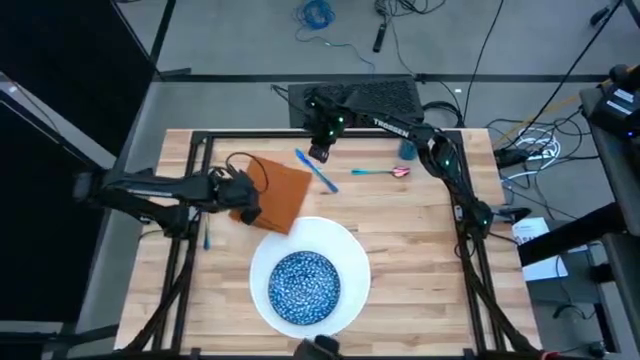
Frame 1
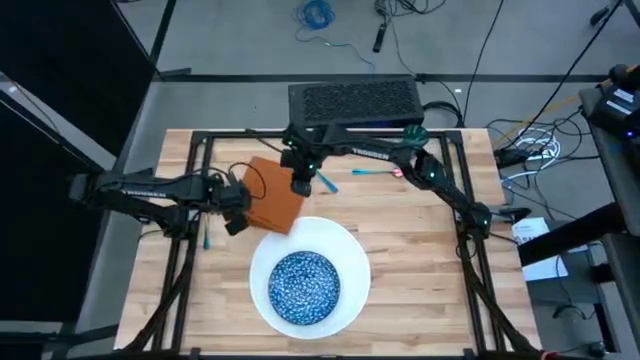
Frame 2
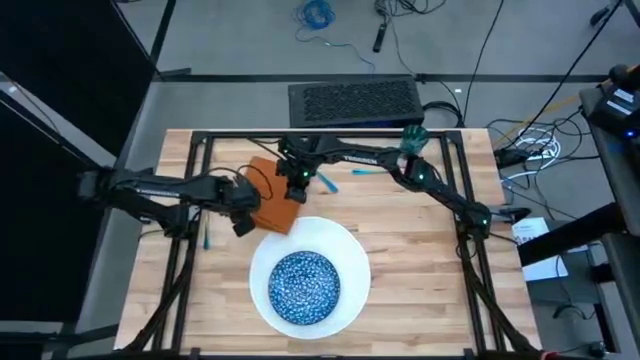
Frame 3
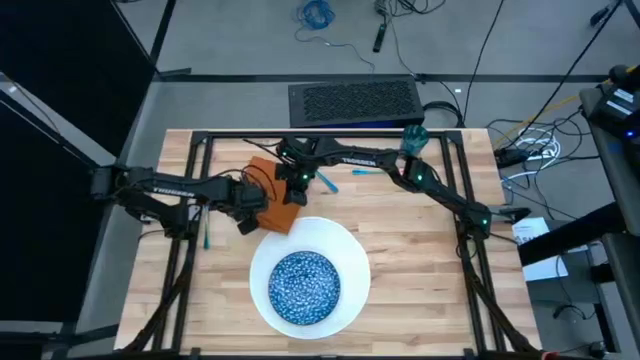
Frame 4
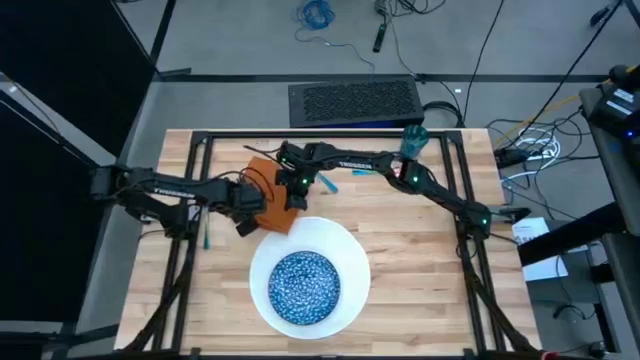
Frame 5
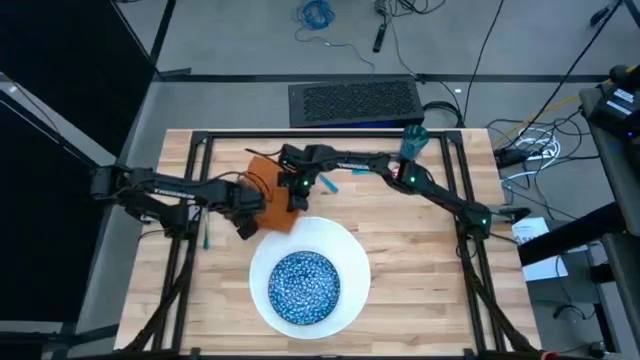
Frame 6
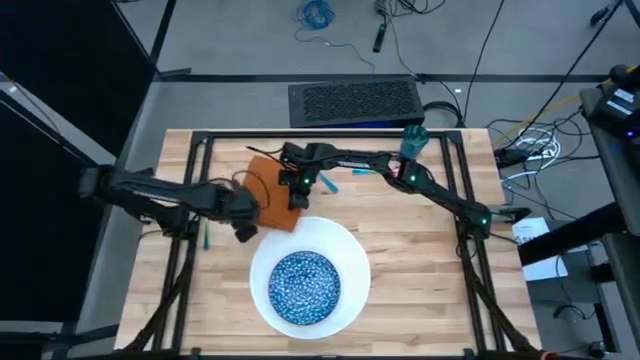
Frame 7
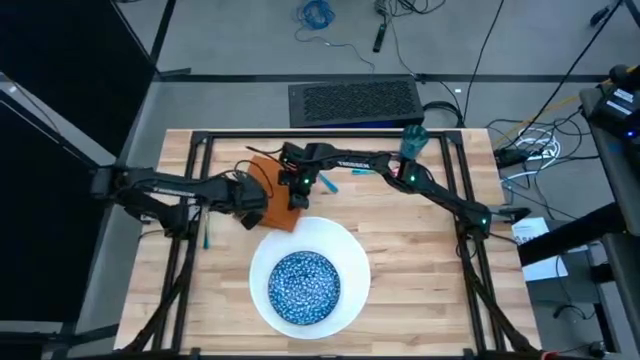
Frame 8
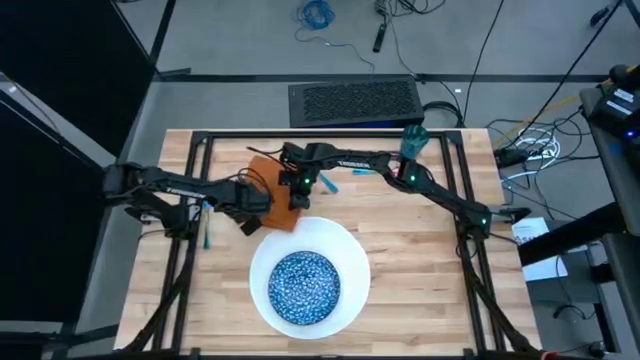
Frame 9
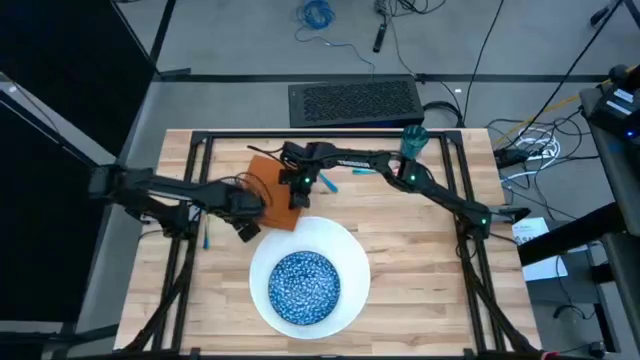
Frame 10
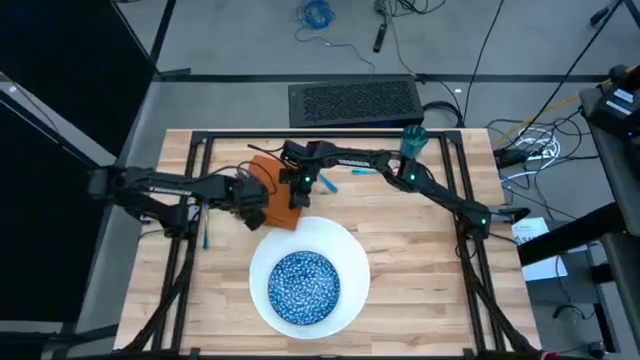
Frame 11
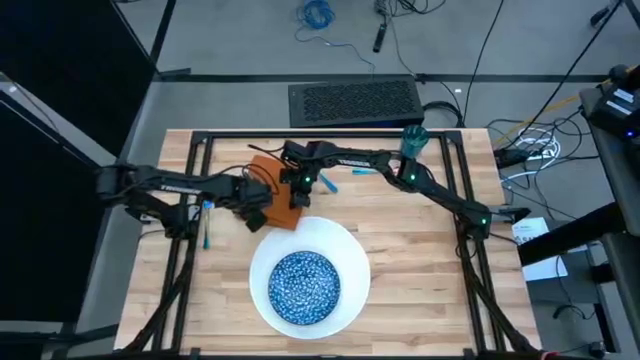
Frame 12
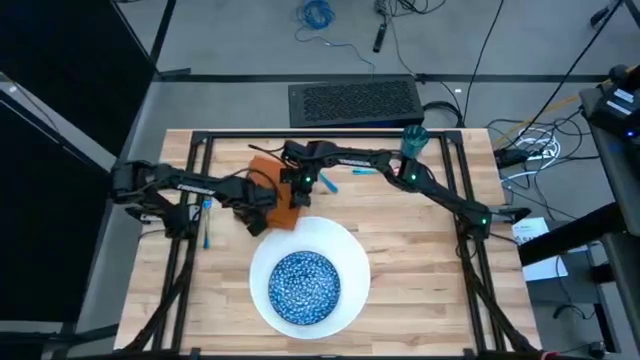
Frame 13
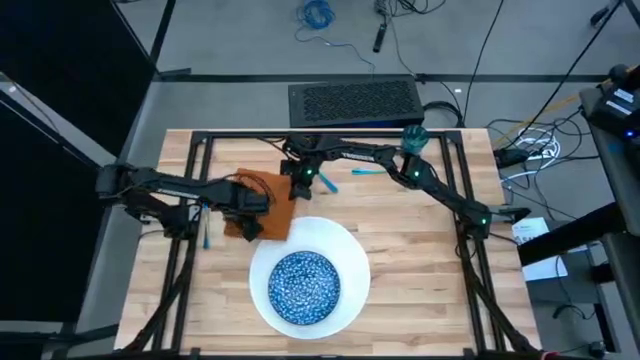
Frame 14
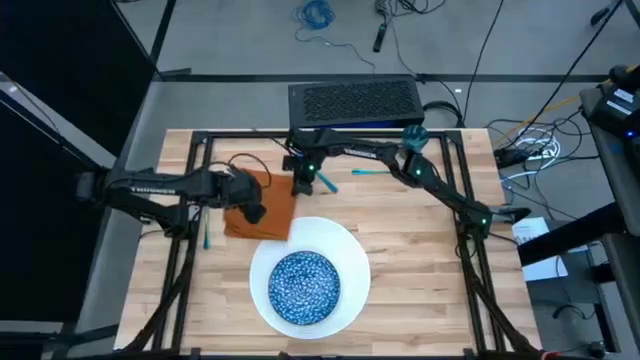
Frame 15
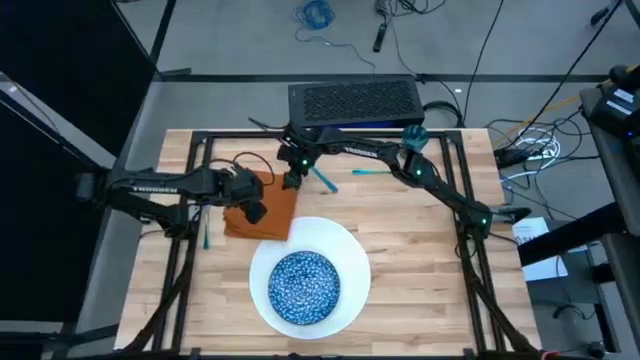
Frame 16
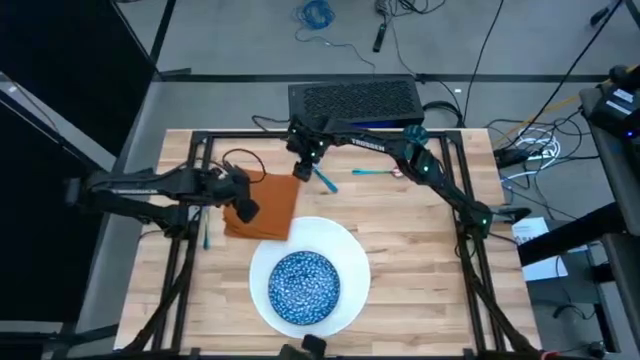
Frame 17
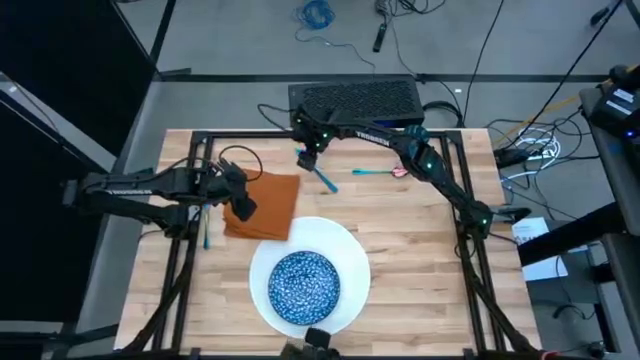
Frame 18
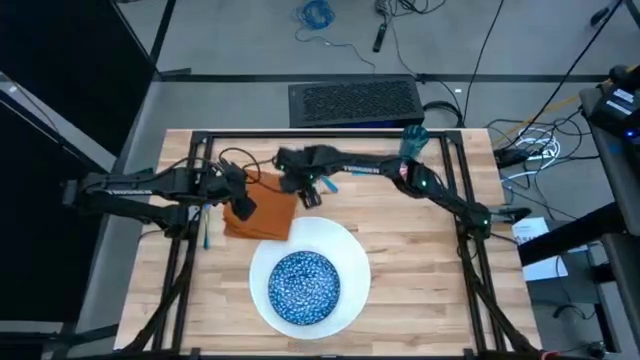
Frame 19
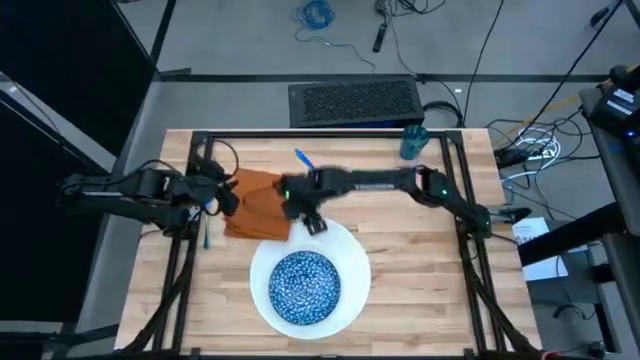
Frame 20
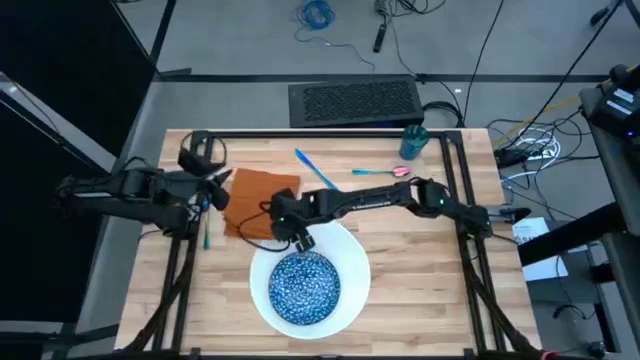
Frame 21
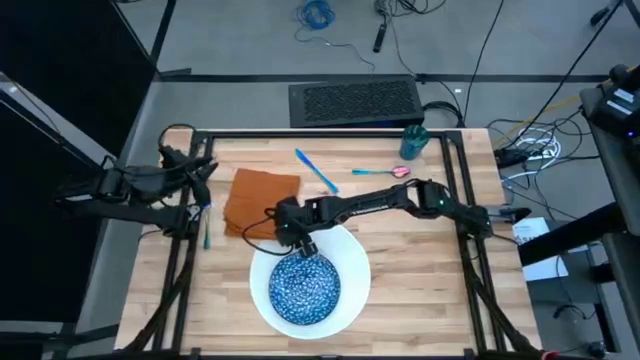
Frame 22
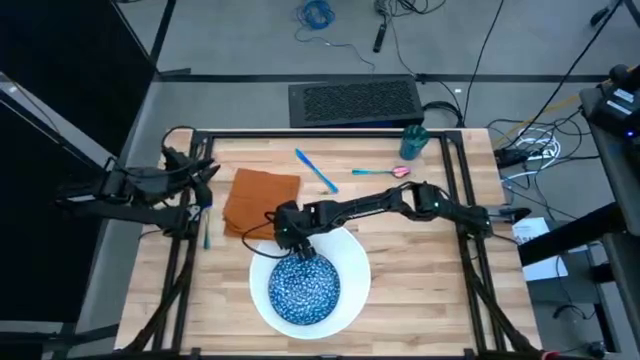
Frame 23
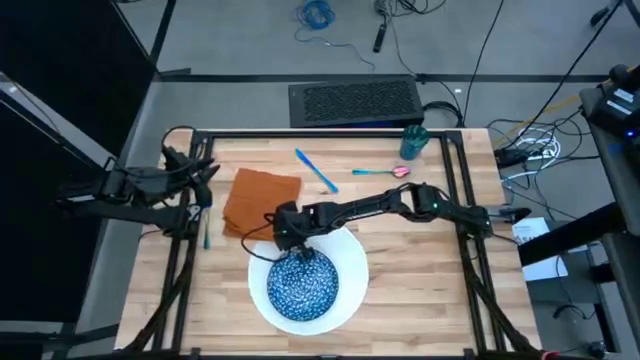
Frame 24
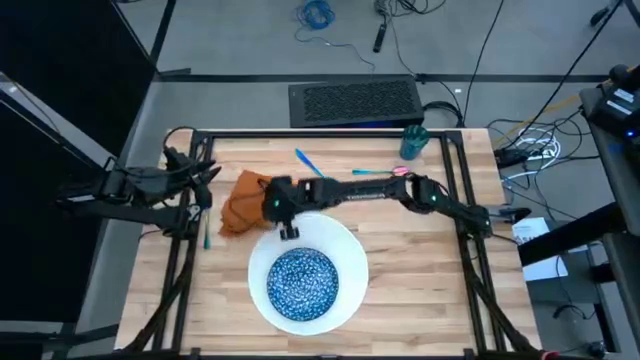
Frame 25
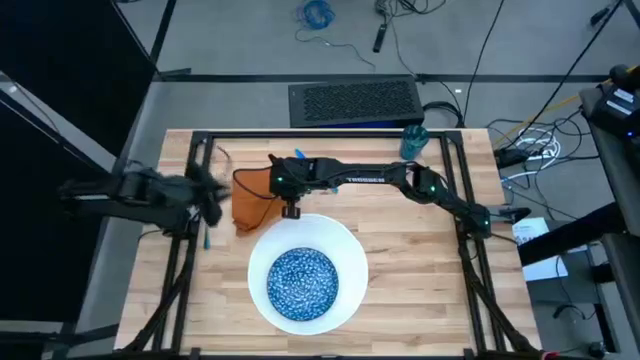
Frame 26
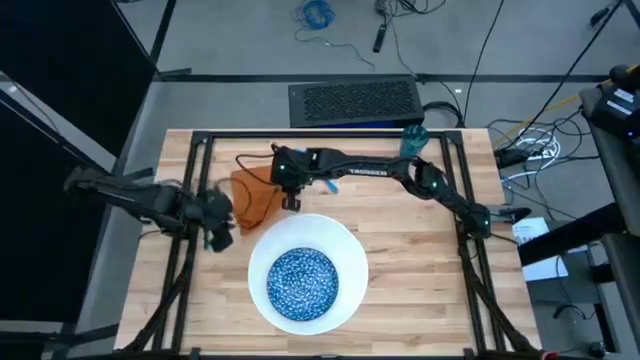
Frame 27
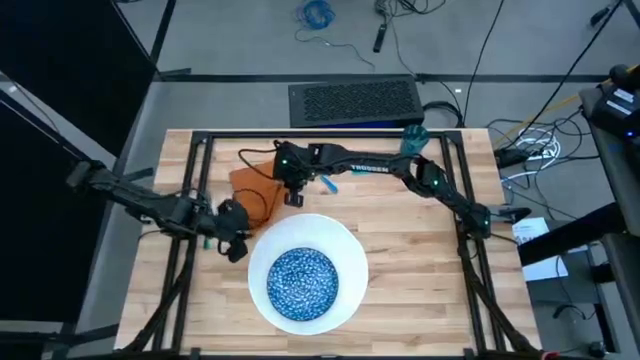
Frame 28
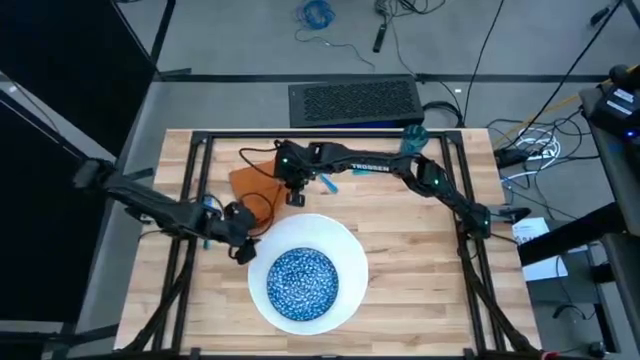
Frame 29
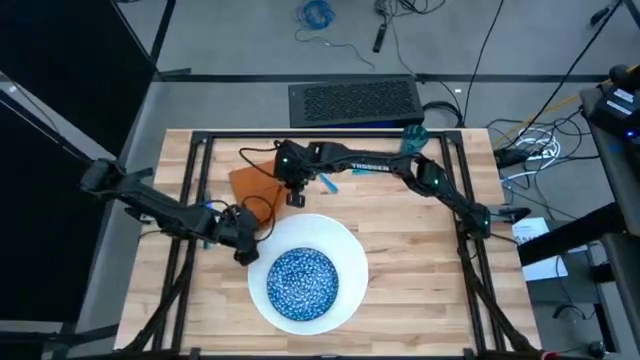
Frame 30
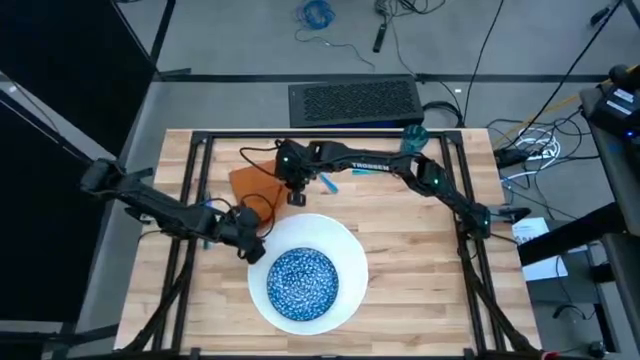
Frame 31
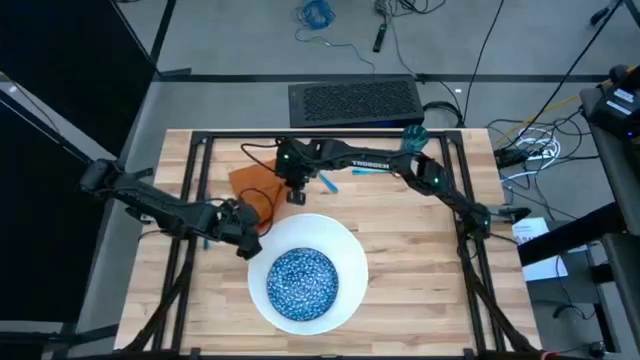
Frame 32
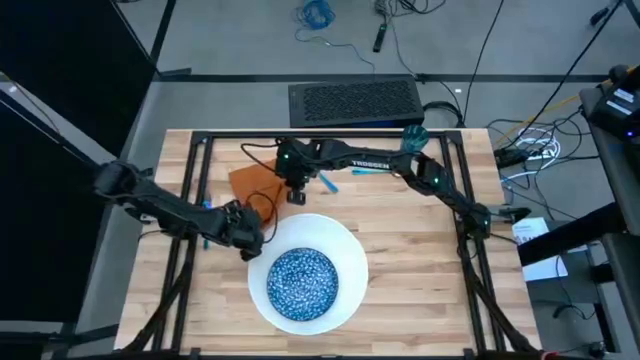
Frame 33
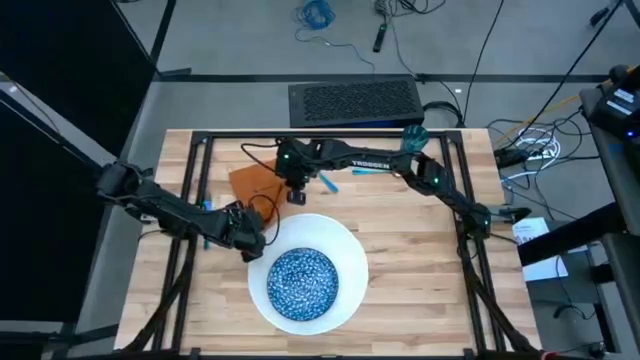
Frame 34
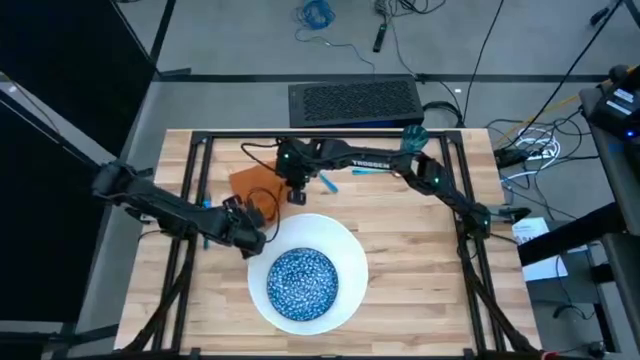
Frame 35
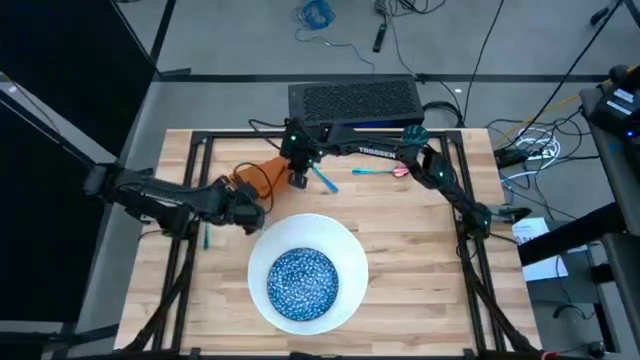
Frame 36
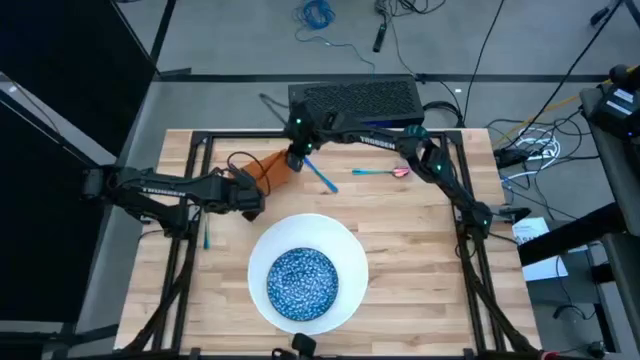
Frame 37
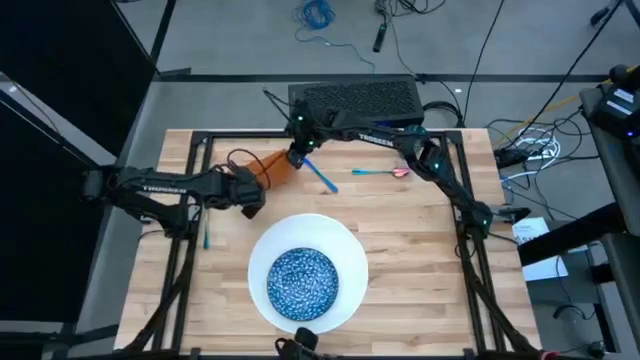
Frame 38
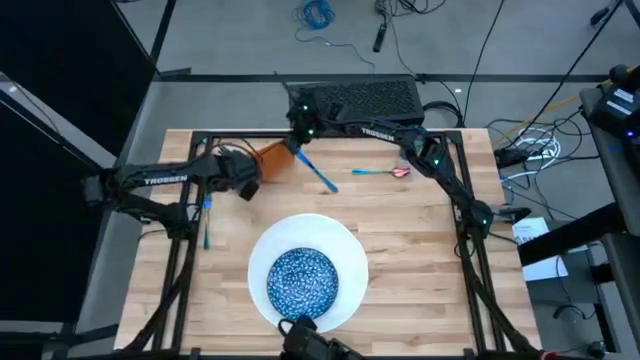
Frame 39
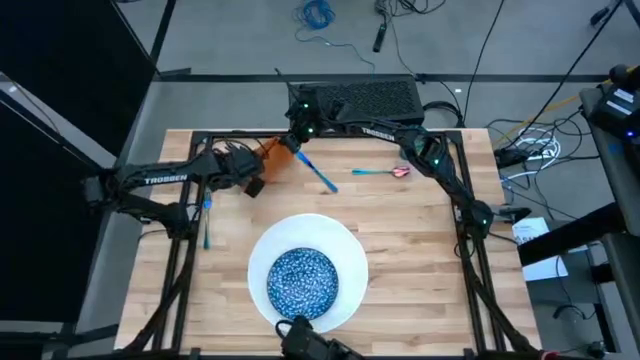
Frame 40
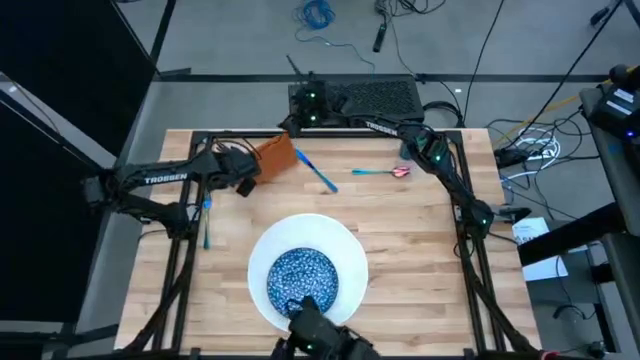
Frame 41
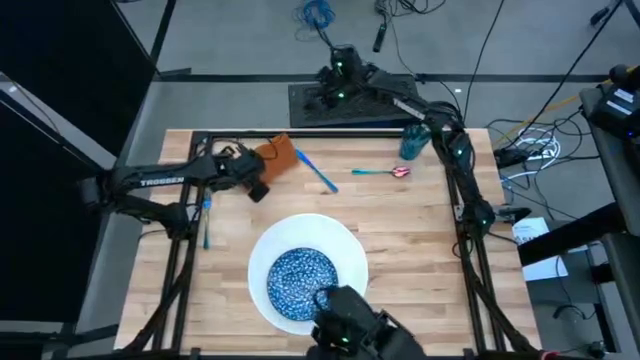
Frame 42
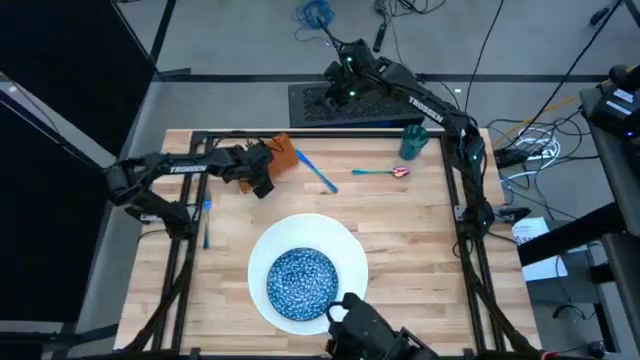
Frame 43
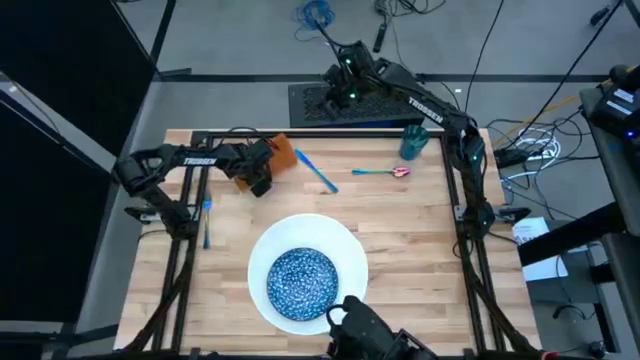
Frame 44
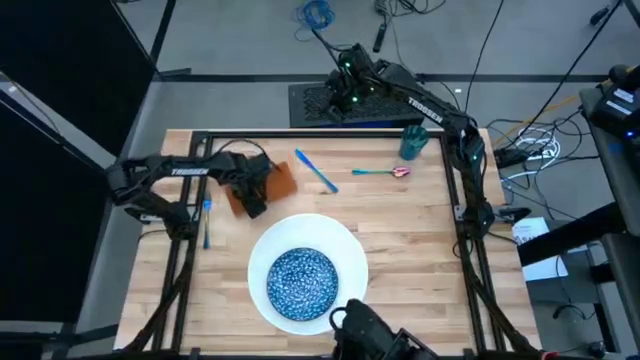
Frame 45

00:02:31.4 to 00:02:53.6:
Task: Set table place
Fold the orange table napkin
